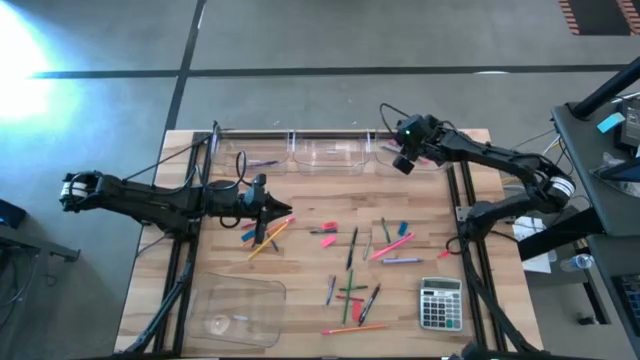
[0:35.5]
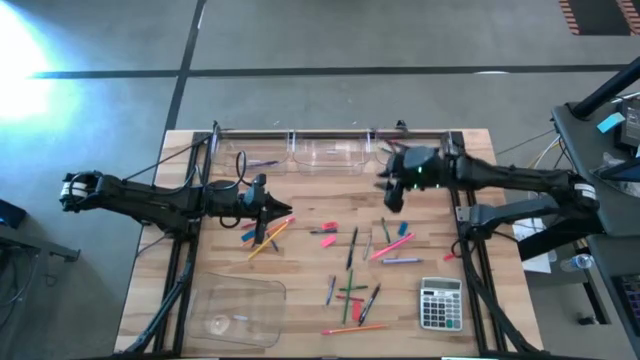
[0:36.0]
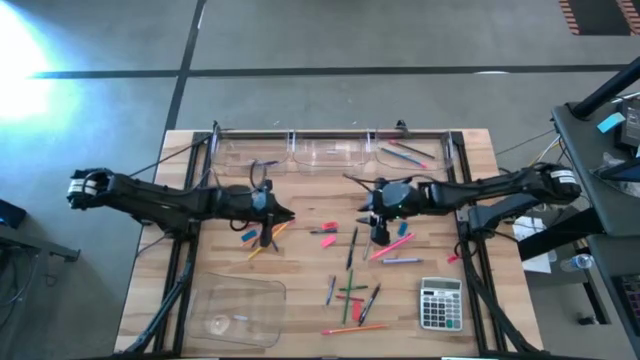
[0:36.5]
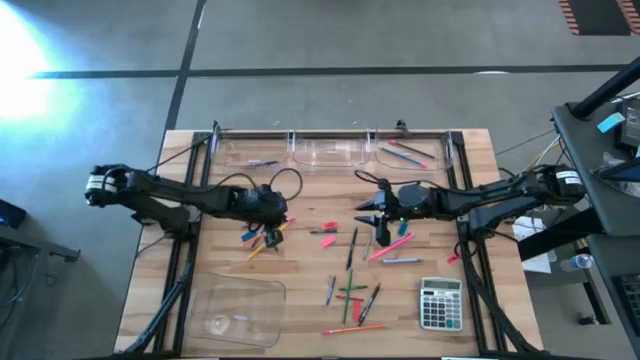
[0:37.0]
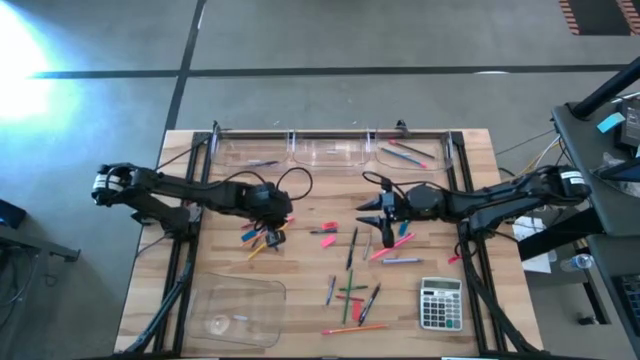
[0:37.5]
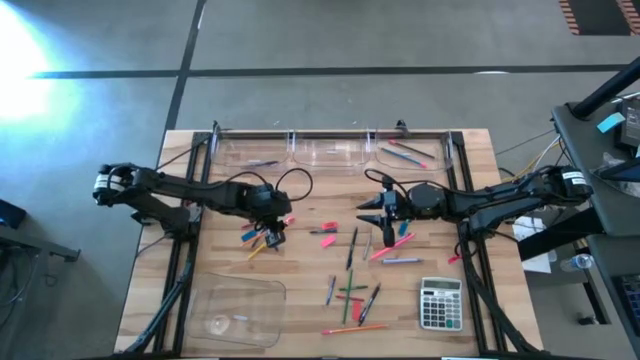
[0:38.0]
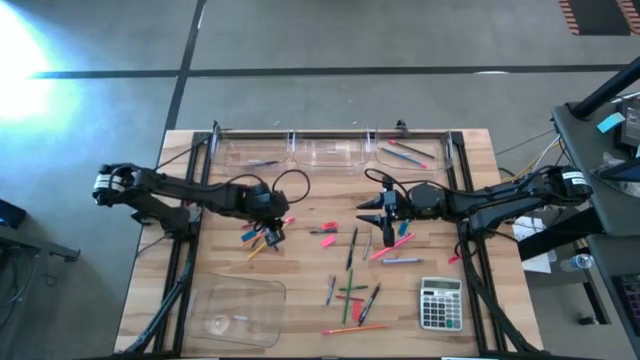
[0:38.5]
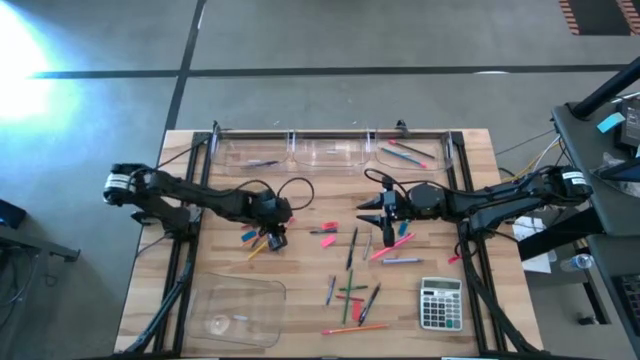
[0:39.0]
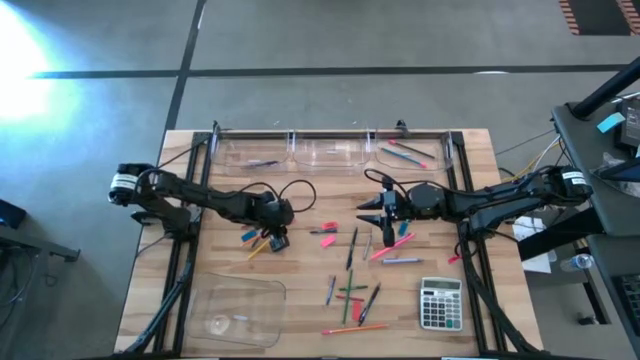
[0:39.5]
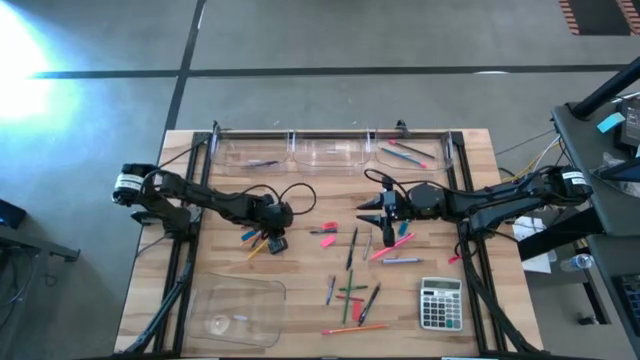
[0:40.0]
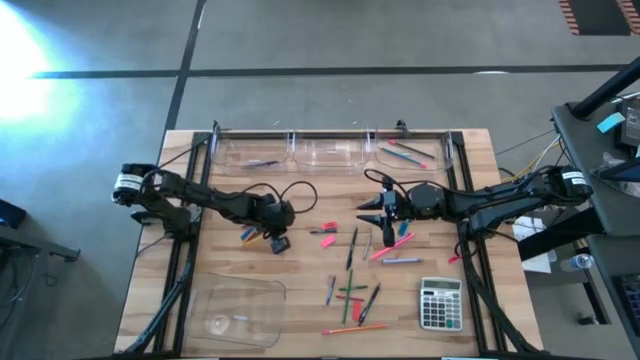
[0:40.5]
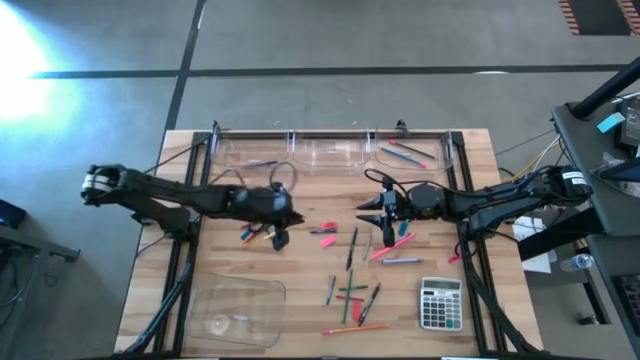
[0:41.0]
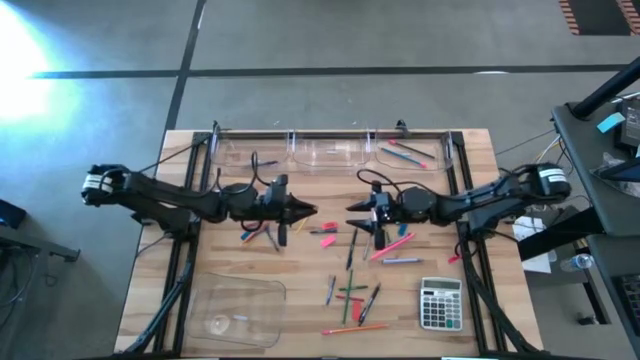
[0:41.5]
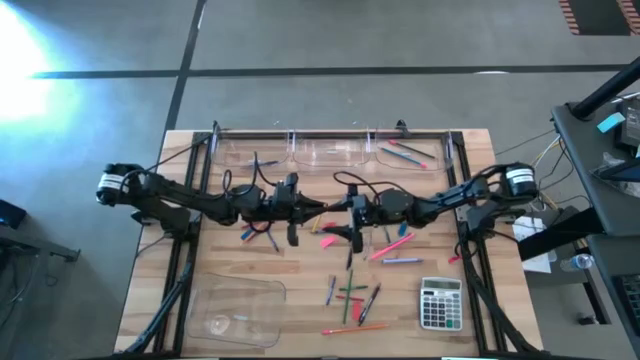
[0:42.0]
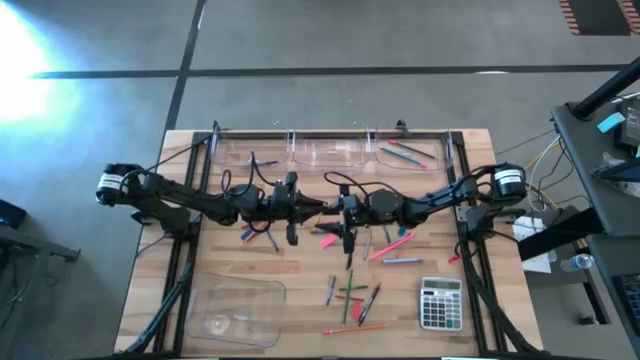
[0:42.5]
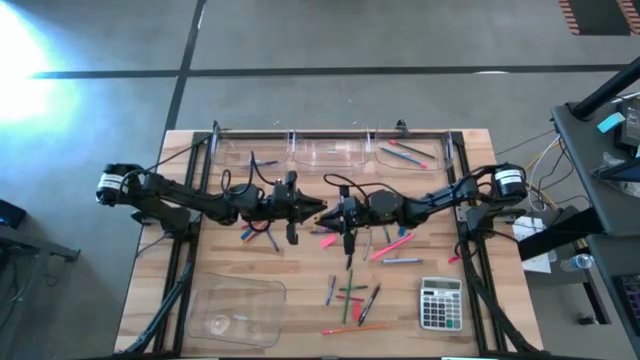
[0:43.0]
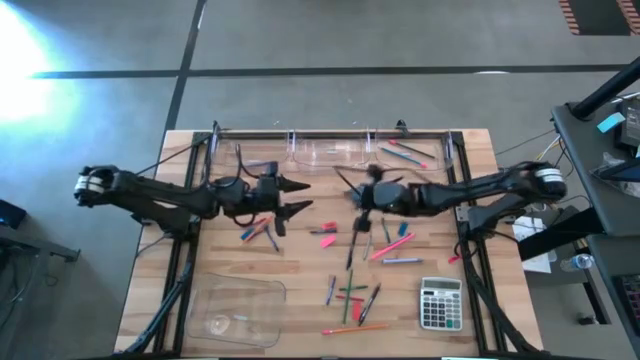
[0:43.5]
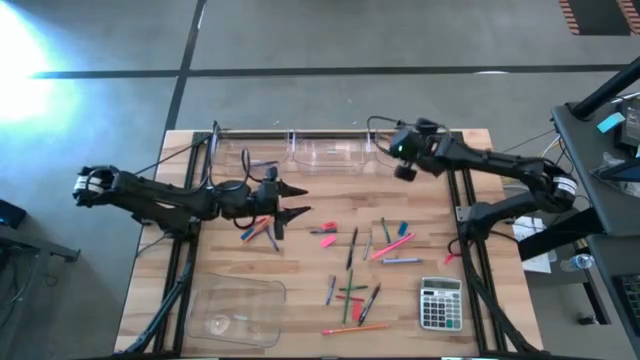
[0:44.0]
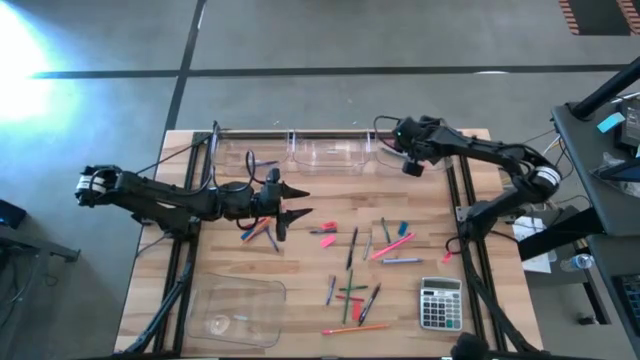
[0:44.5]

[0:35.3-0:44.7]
Task: Sort crayons/erasers/pens/pencils in bins
Put the yellow pencil into the top right transparent bin

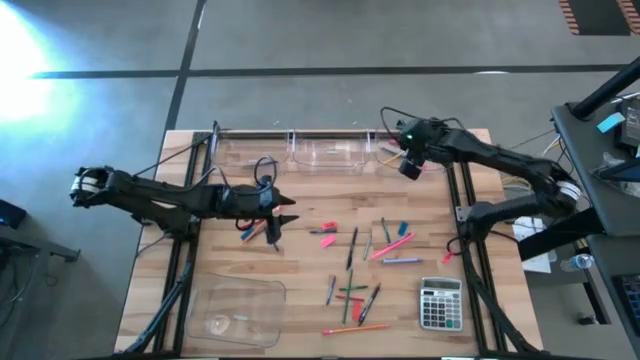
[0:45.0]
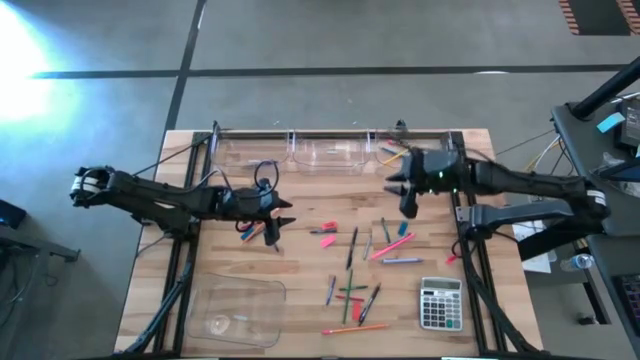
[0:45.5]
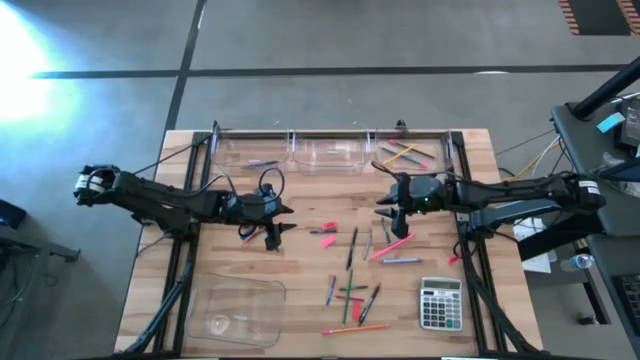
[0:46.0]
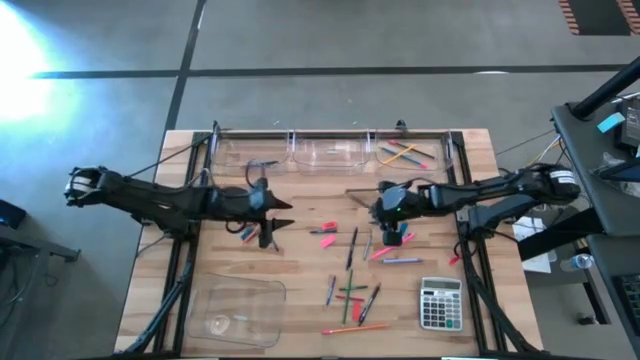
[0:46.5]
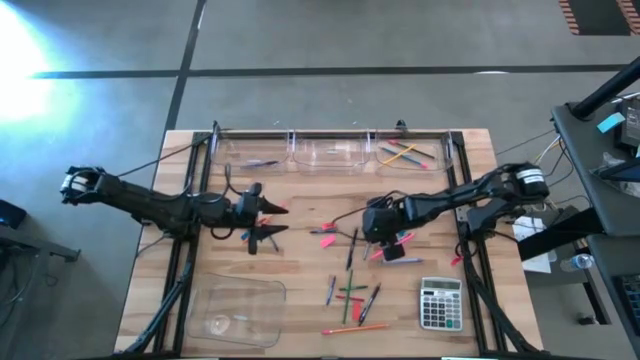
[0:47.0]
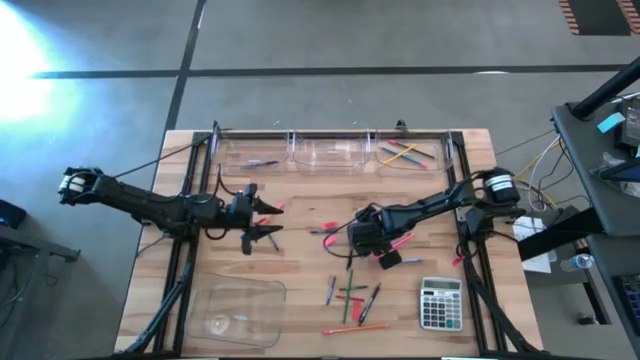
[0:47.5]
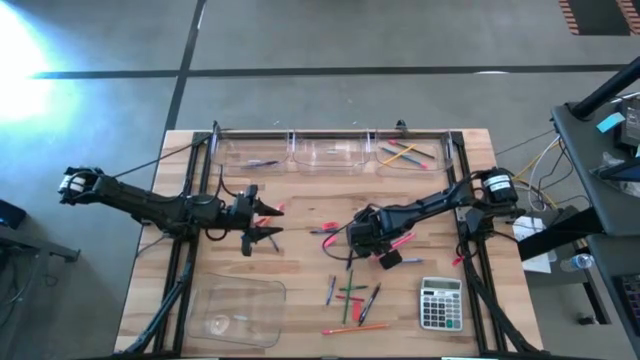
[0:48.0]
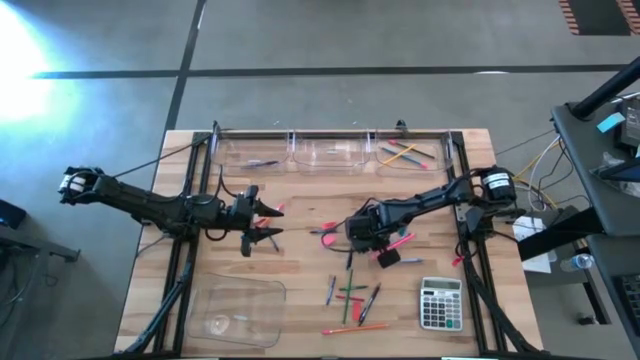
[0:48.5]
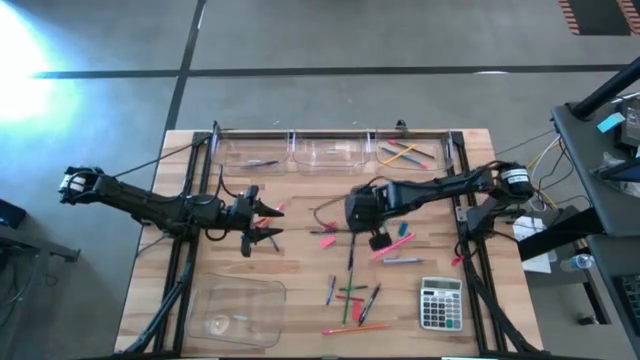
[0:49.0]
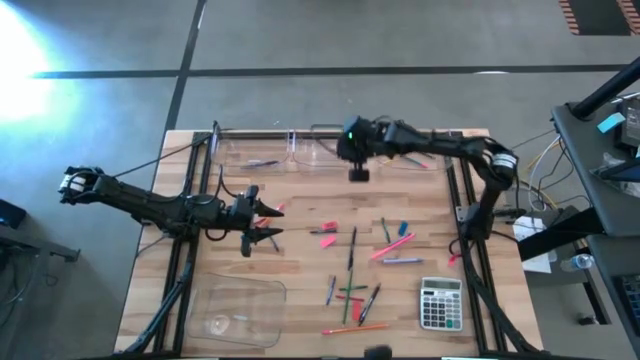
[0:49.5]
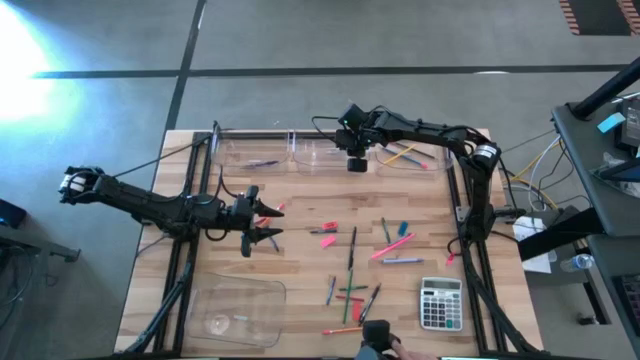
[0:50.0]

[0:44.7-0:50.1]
Put the gray crayon into the top middle transparent bin

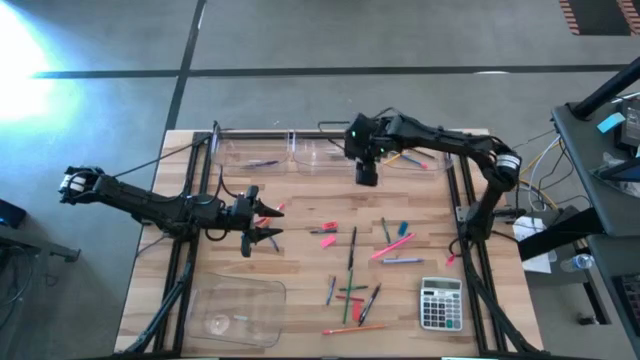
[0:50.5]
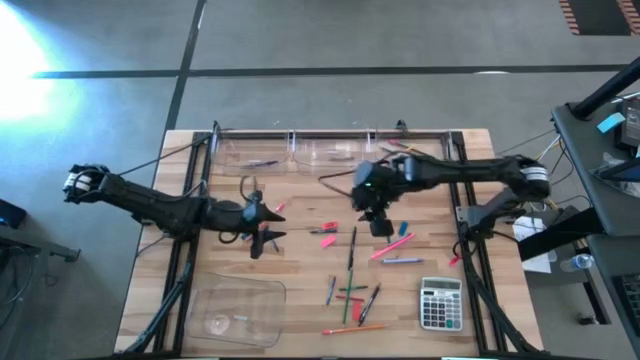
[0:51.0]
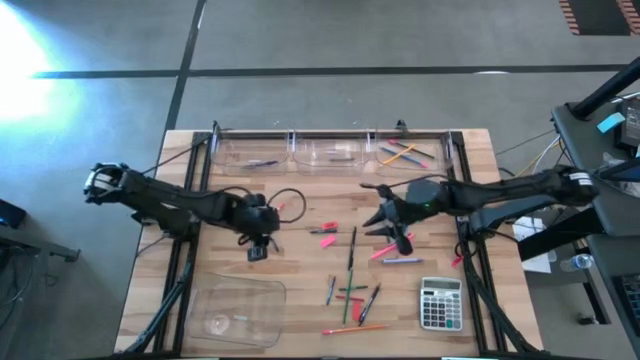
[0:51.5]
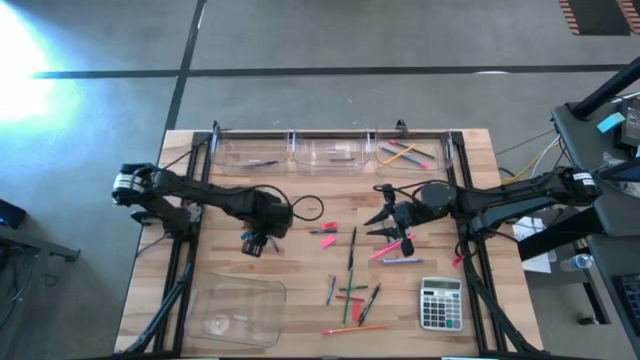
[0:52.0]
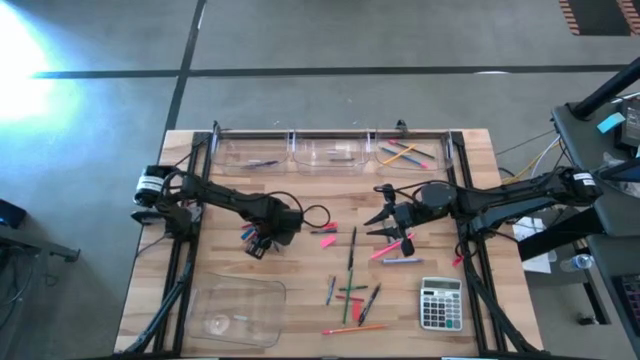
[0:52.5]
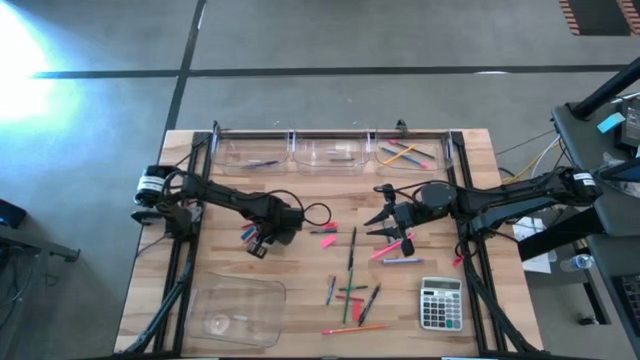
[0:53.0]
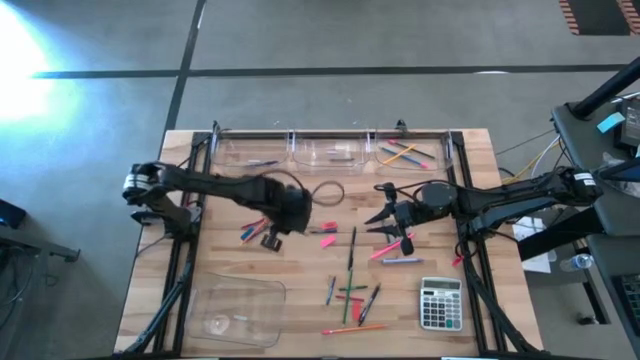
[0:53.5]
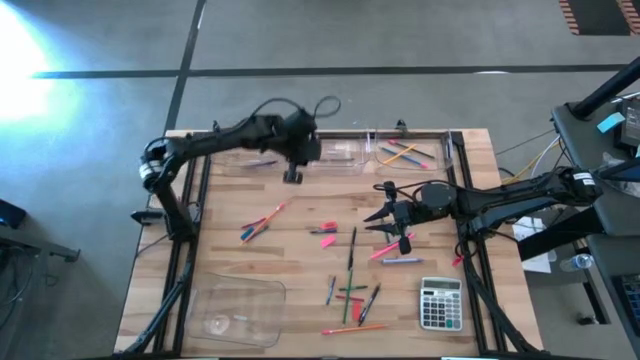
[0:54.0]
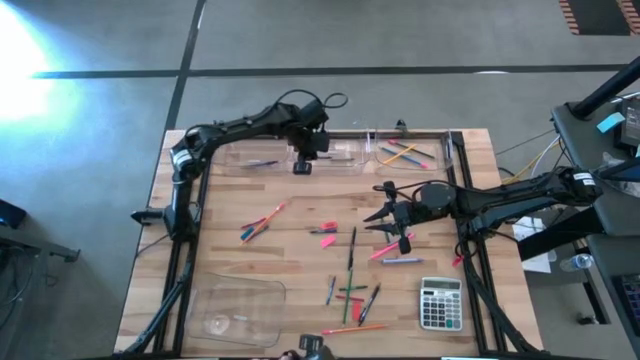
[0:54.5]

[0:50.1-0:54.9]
Put the blue crayon into the top middle transparent bin

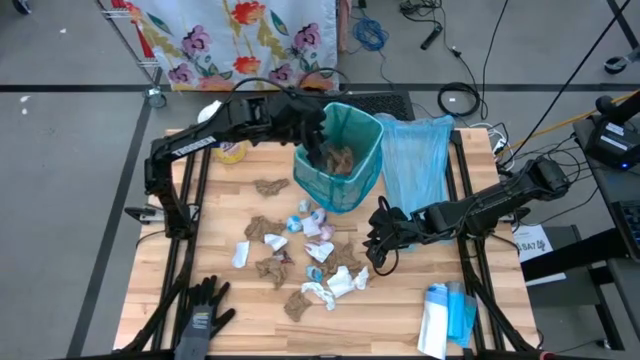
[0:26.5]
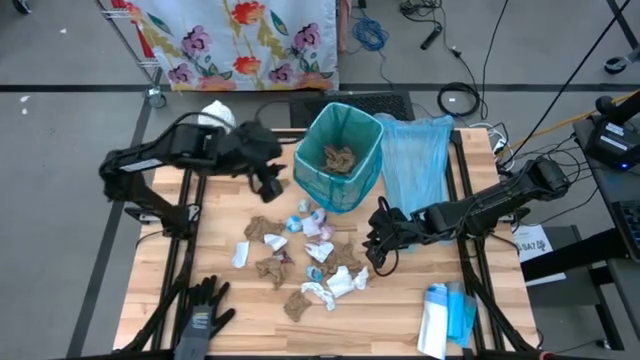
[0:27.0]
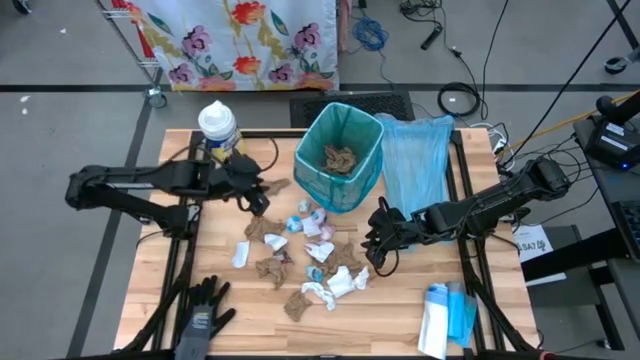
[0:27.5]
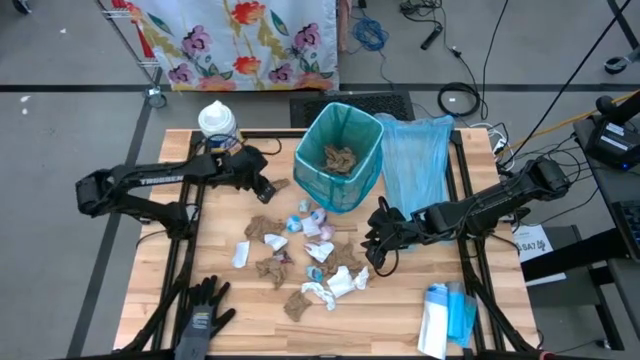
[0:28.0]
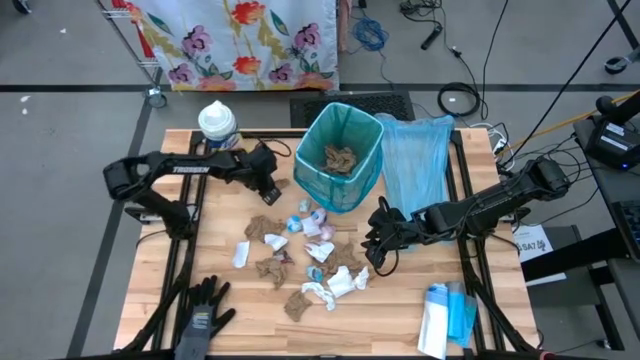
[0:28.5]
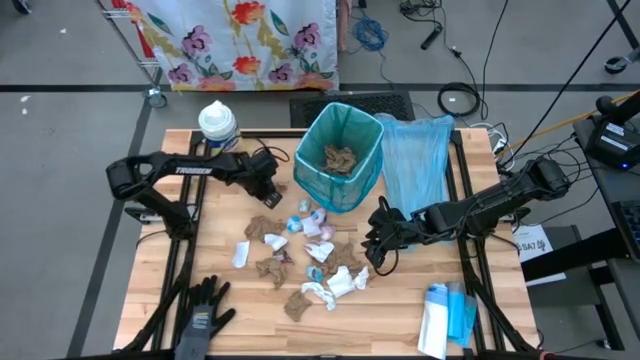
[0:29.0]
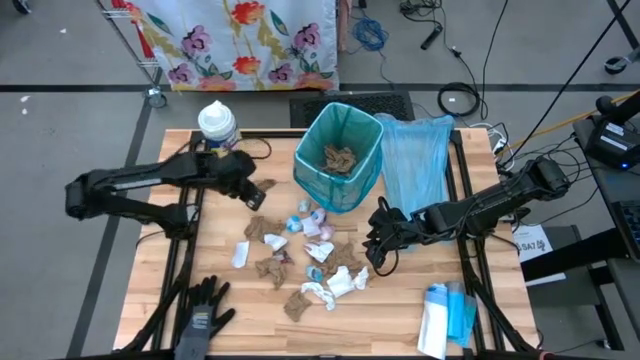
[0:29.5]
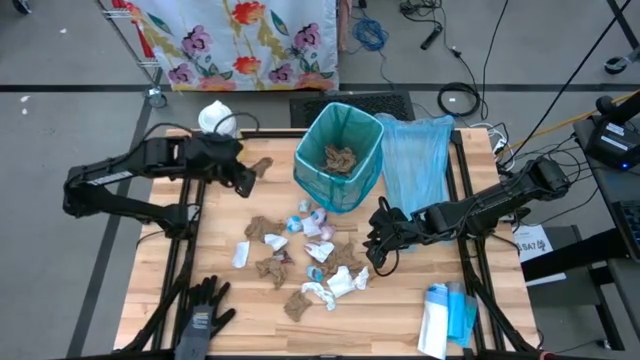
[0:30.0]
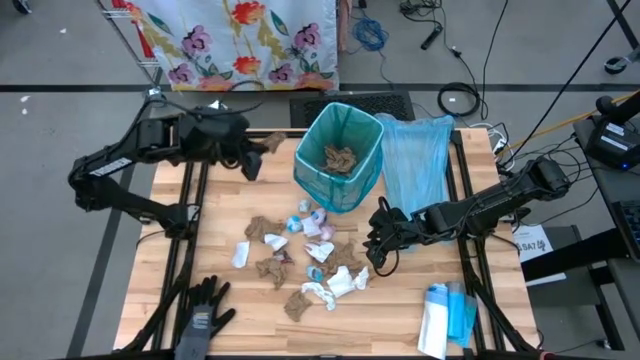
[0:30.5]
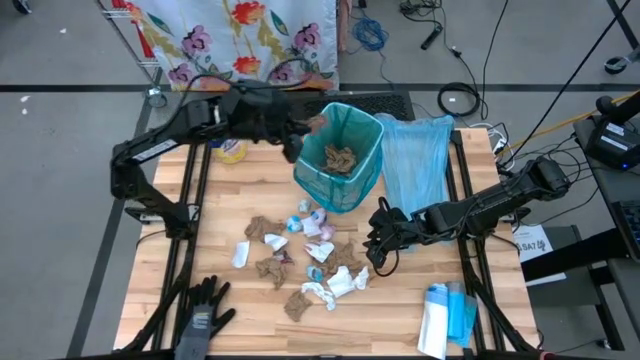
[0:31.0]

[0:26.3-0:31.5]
Task: place trash/remove bag and relplace
Put the brown napkin into the trash bin
